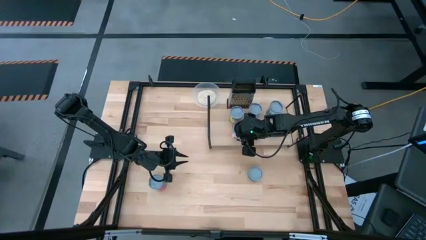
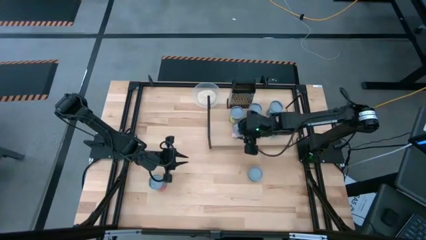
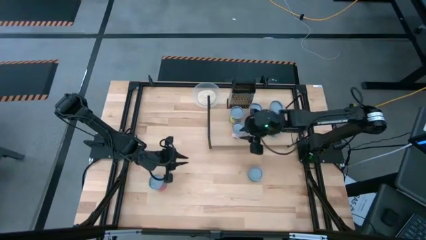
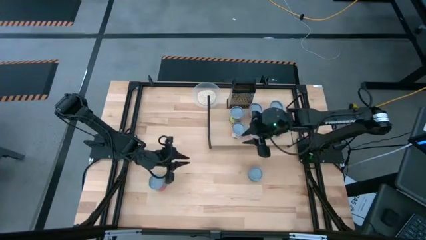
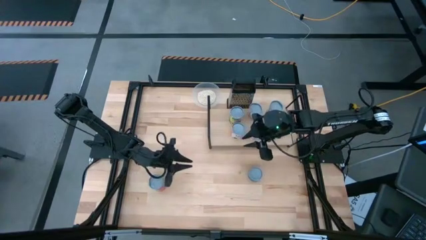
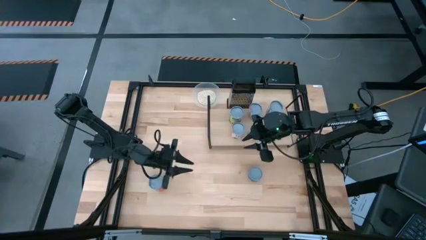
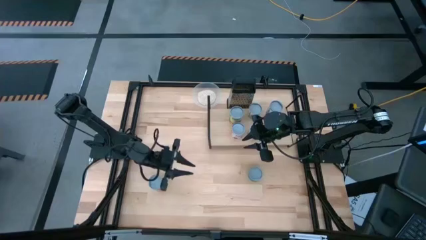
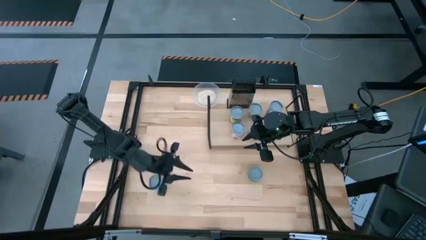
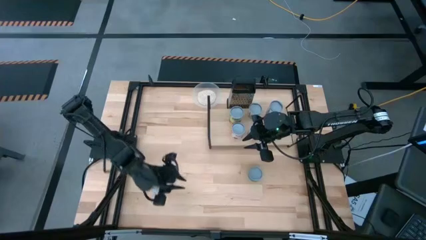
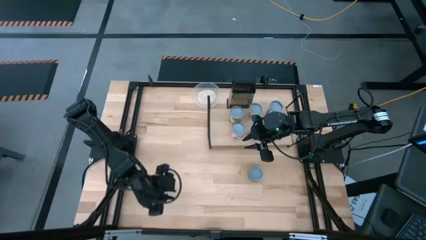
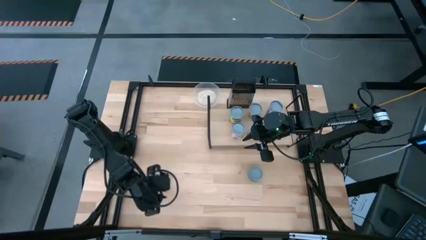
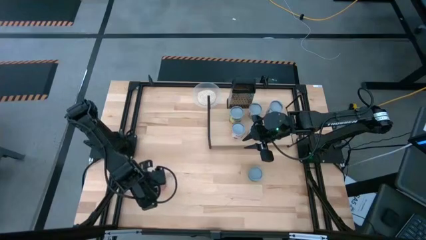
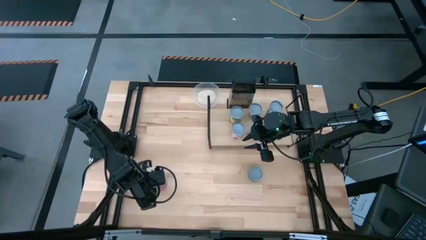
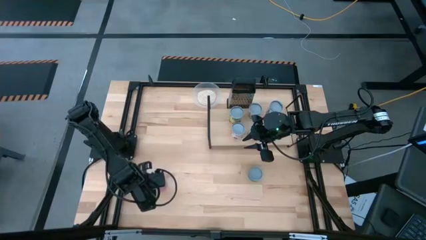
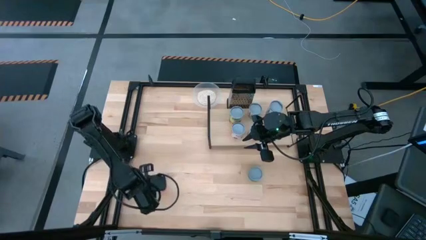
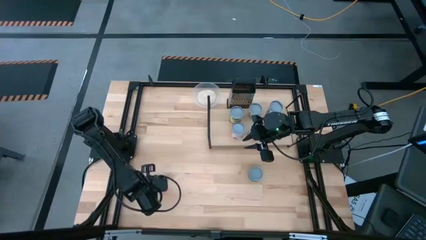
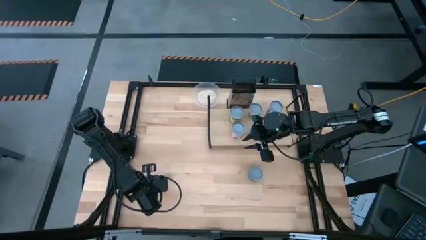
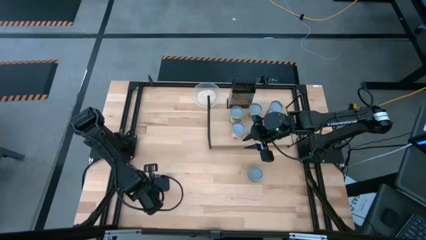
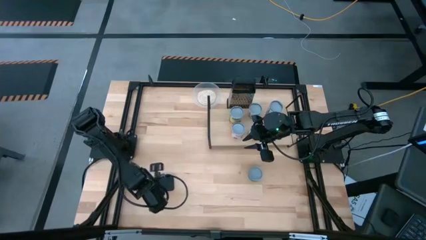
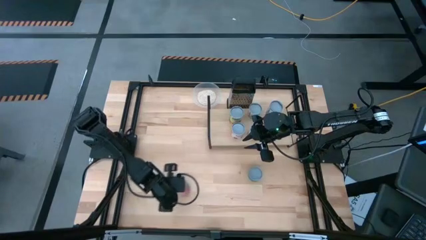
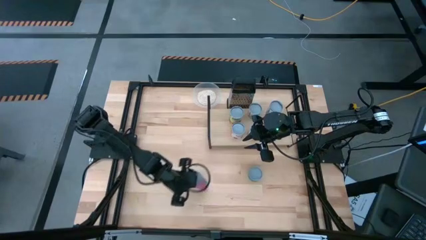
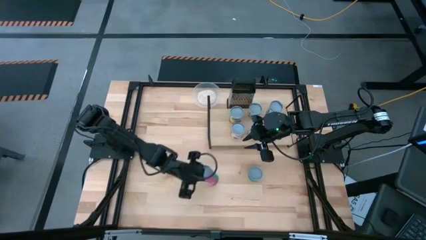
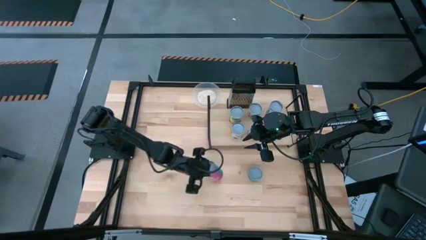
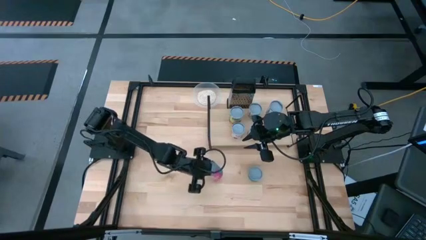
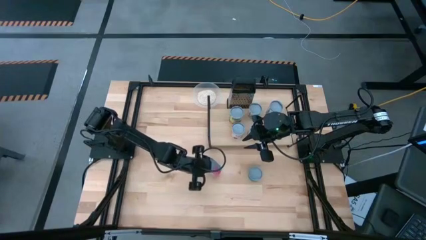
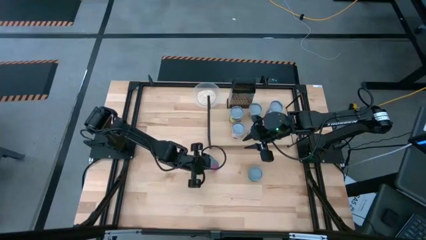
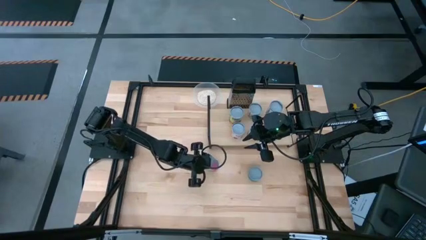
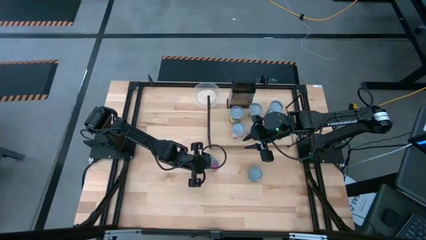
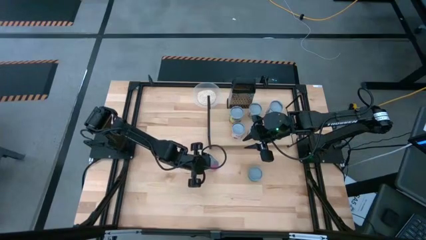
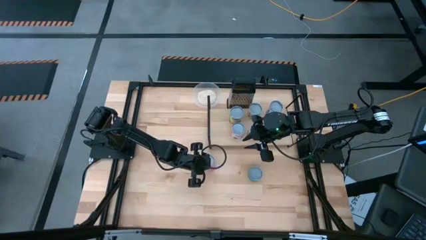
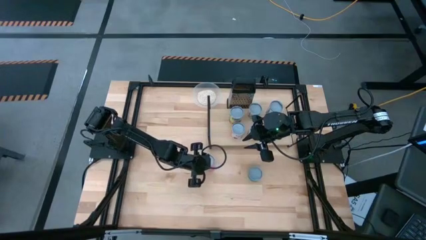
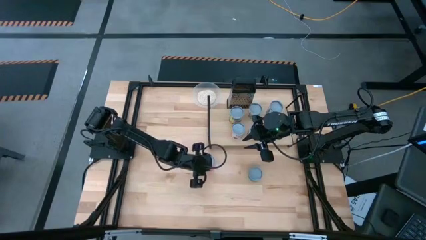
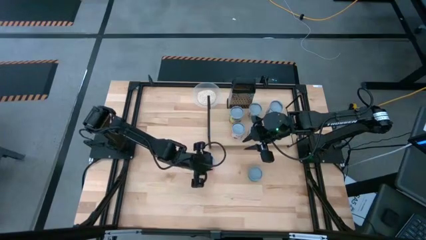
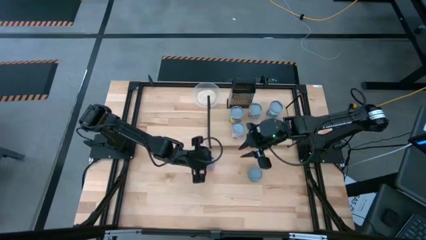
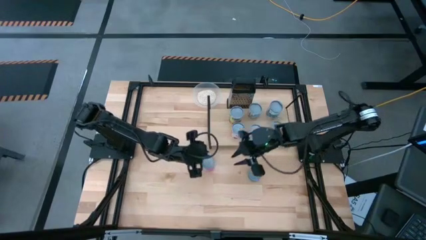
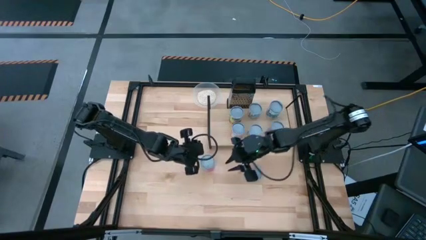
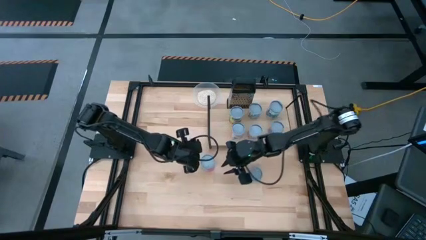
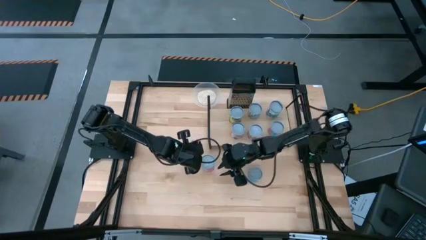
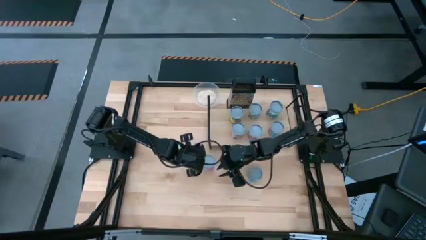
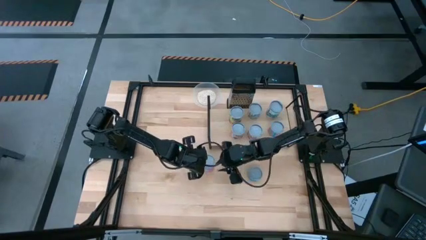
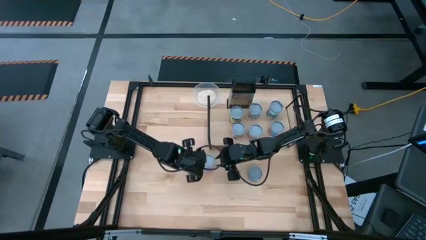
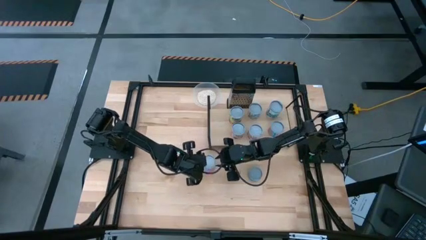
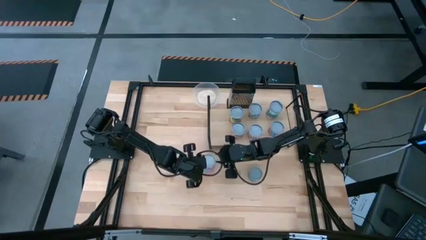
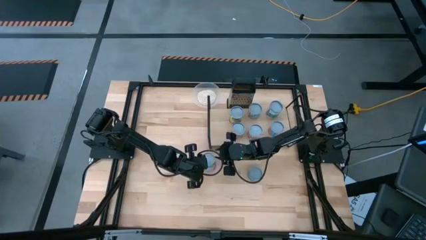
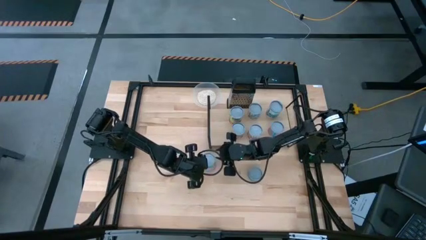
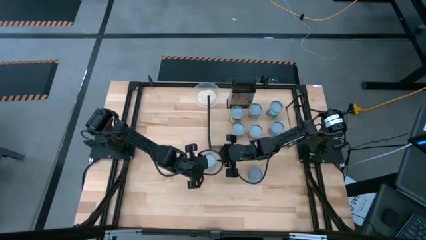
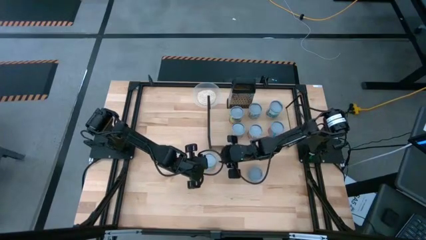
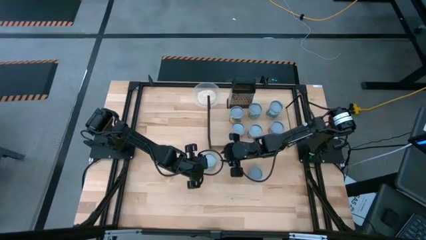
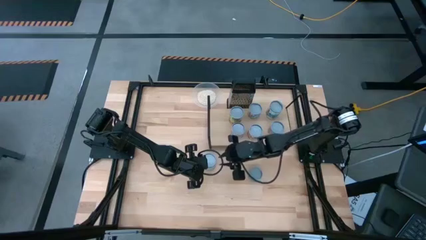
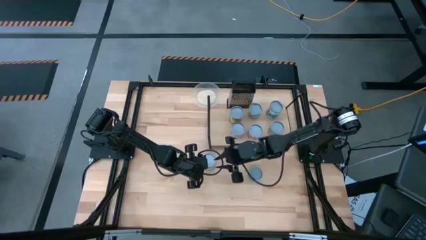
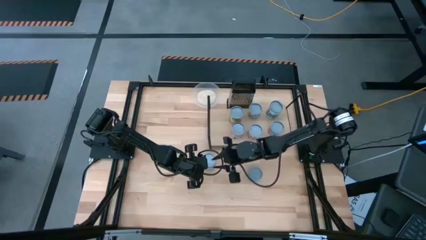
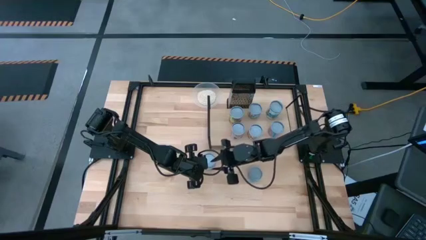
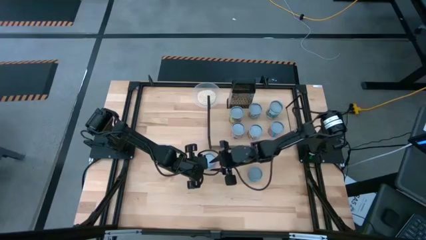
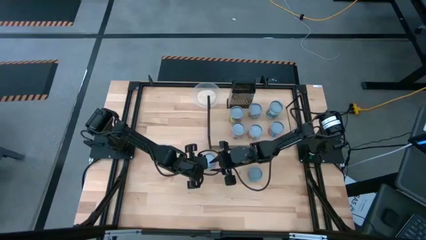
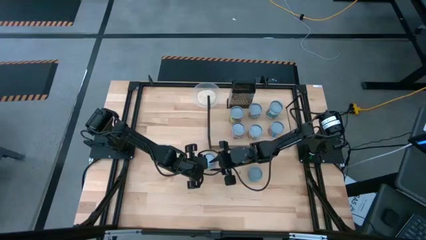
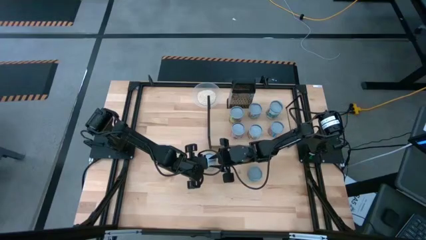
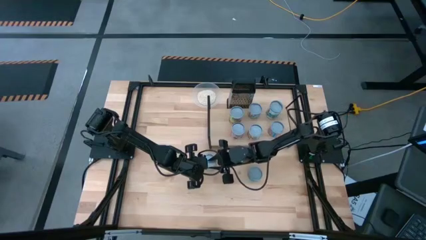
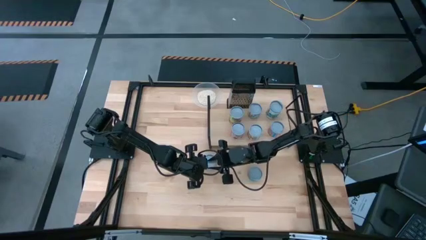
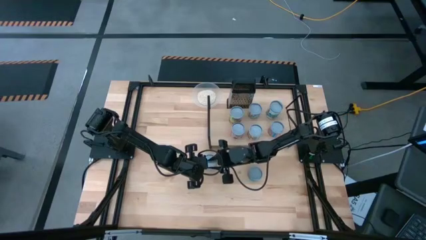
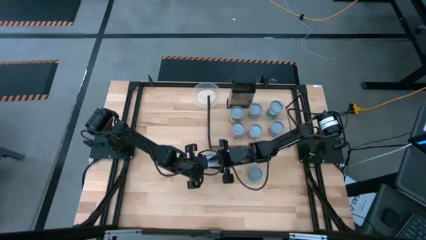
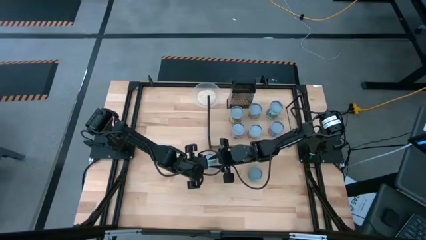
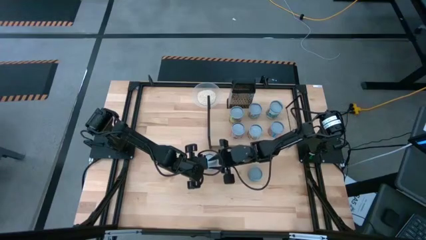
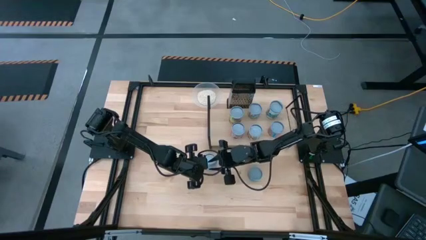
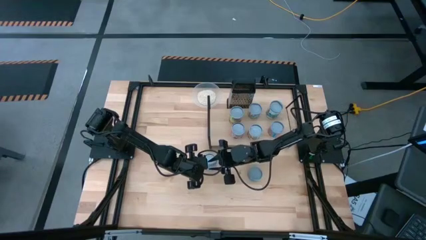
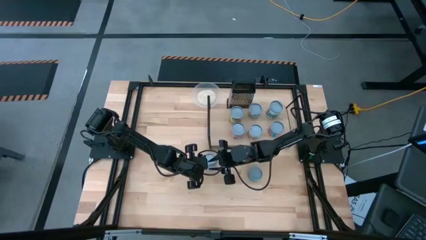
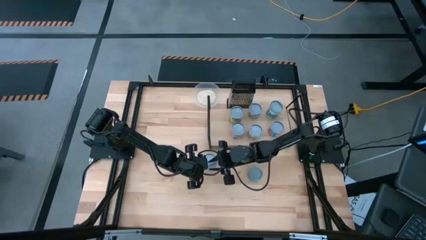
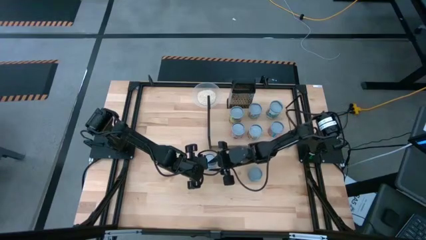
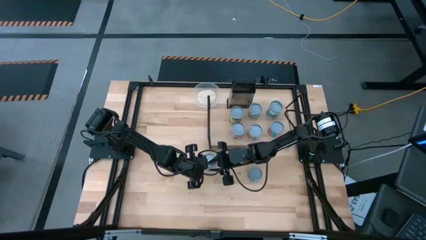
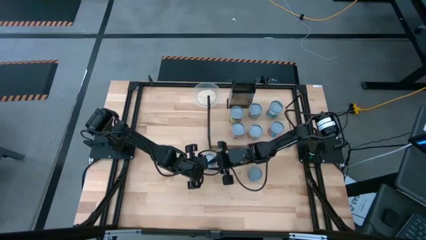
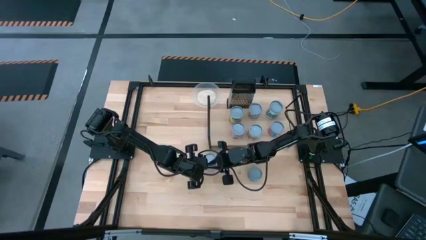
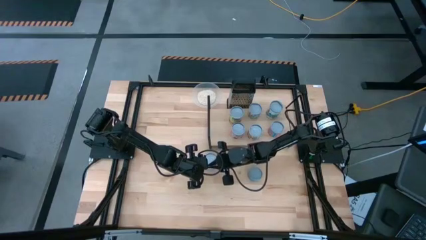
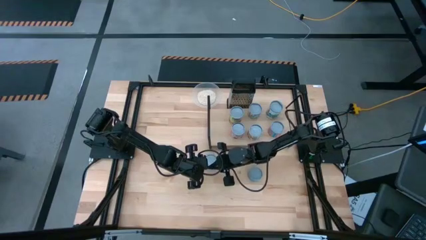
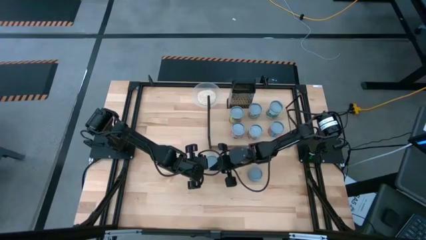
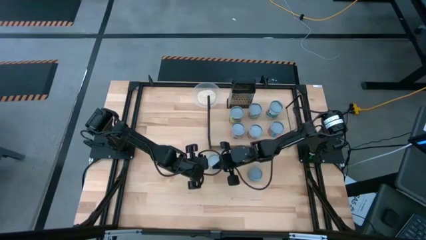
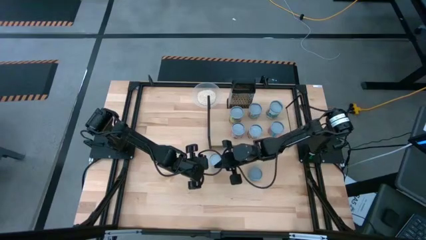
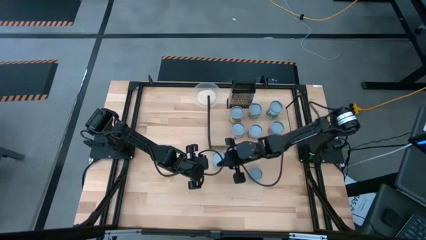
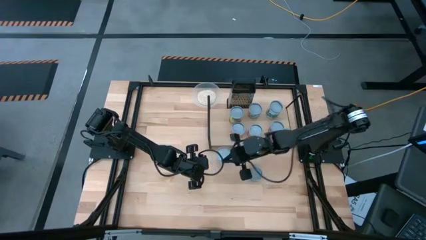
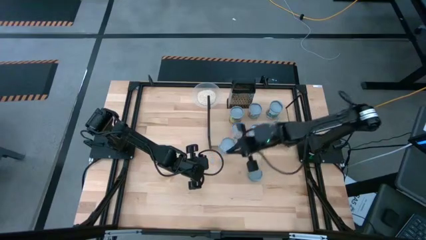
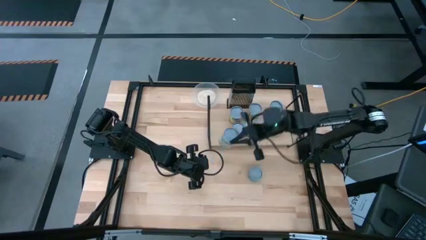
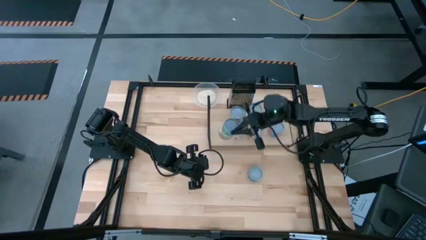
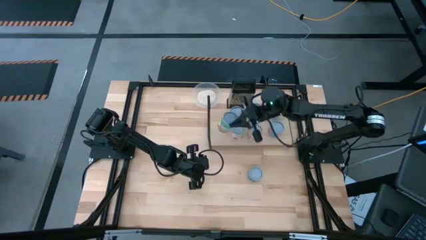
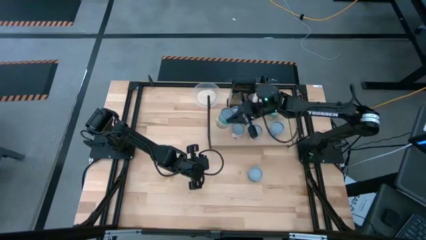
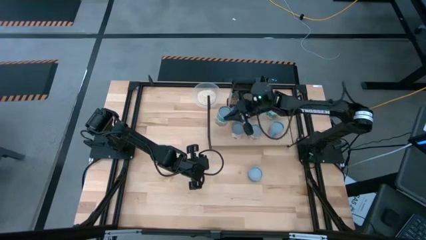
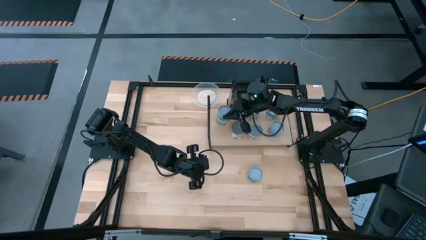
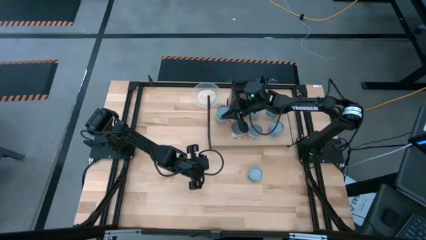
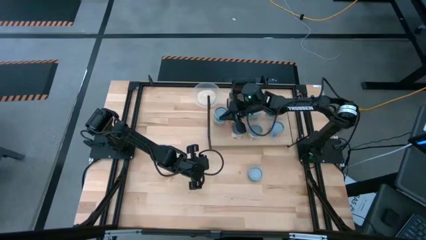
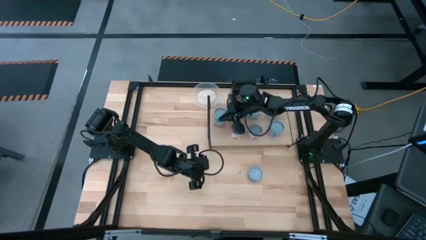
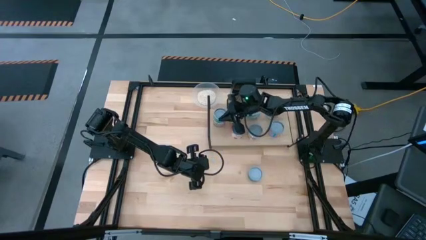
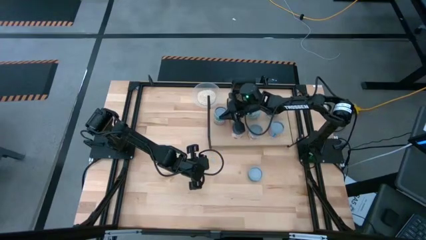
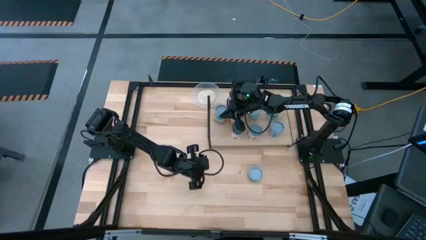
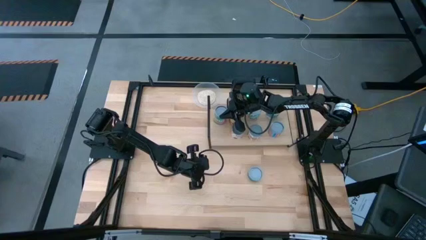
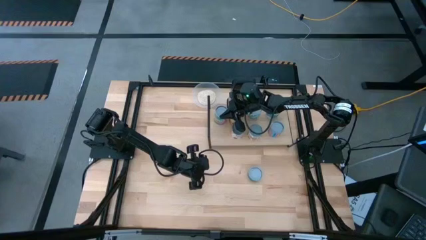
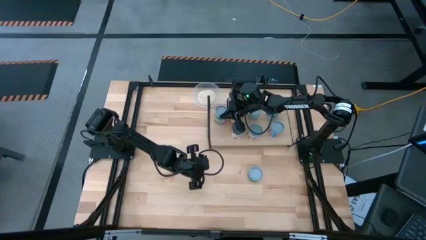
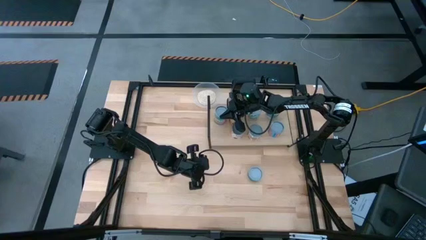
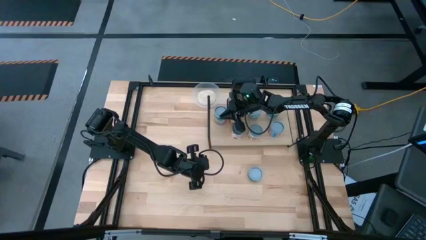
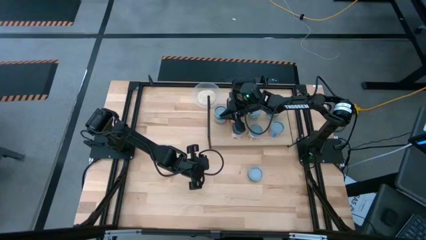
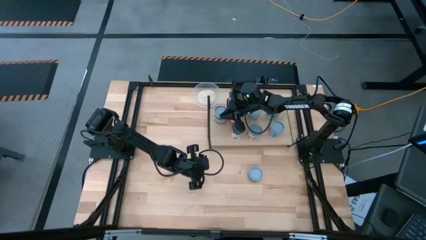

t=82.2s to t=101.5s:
Task: Pick and place cans onto a shelf
Put the pink canned chicken soup on the shelf
